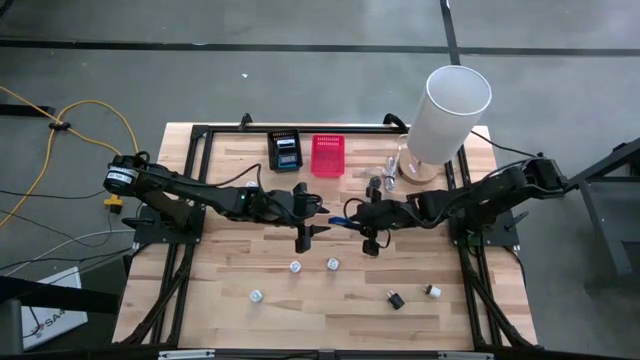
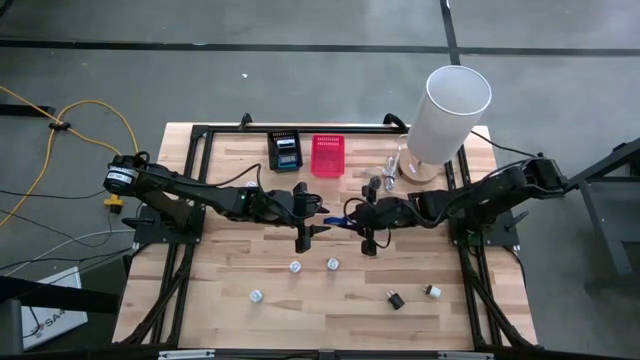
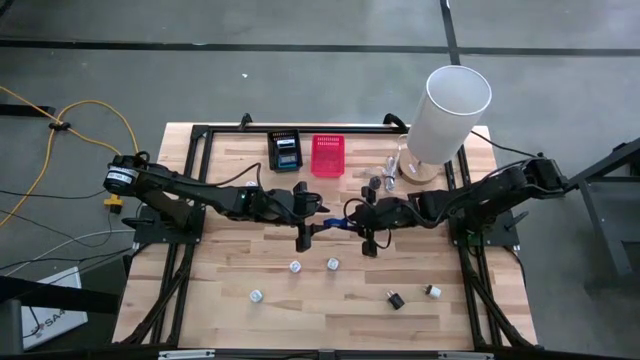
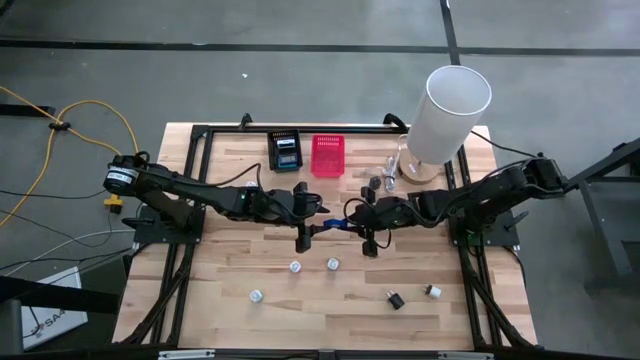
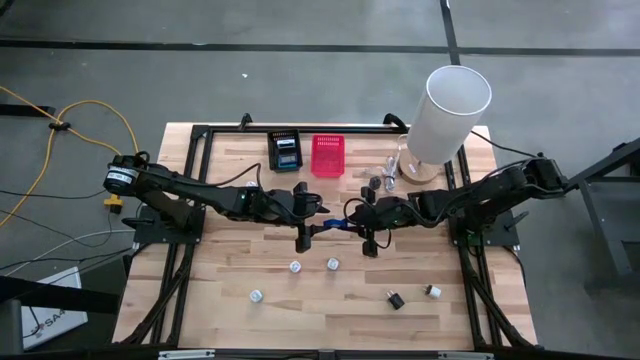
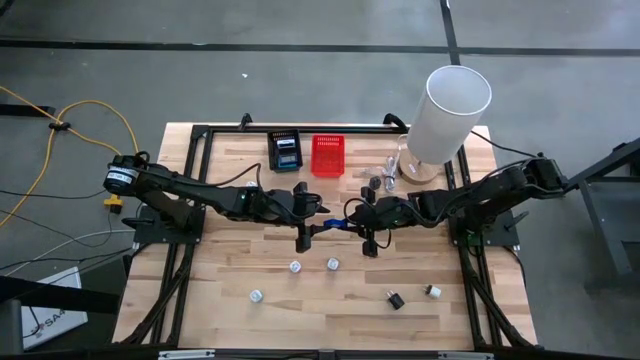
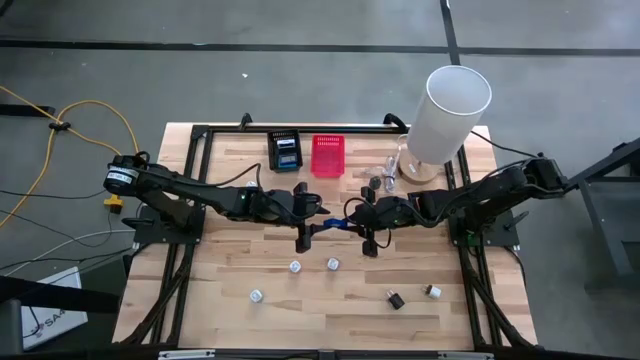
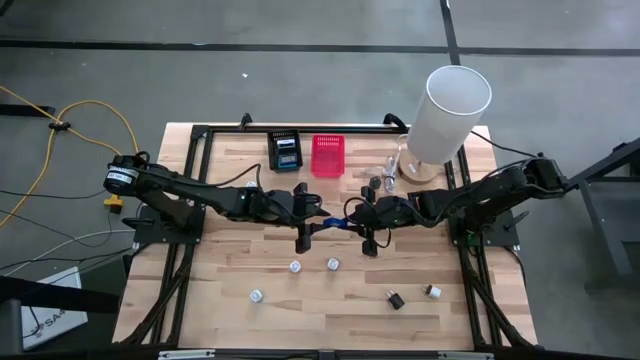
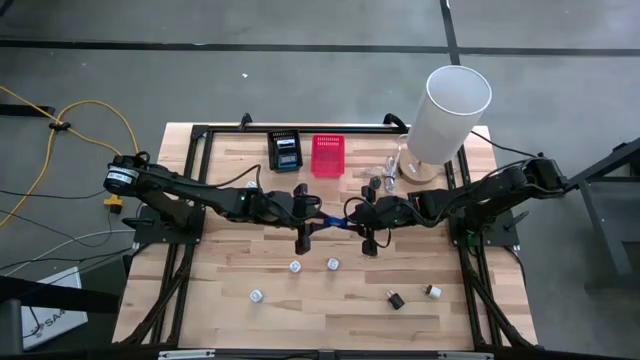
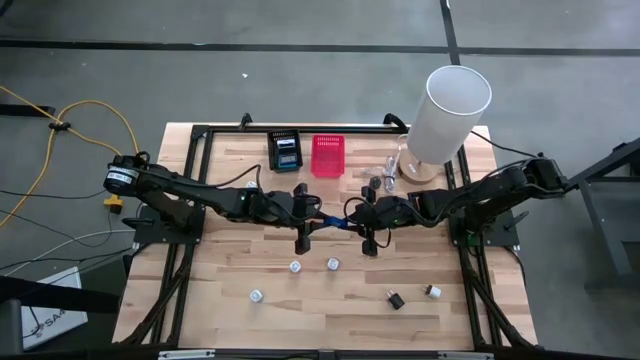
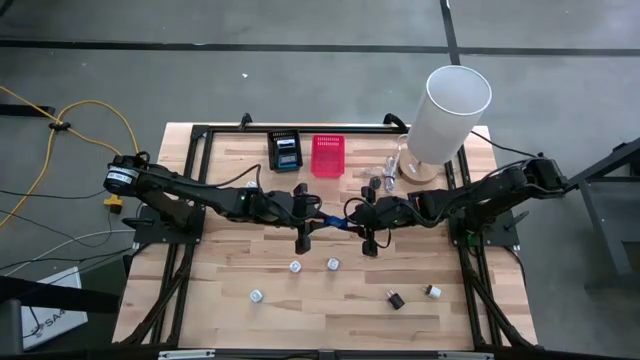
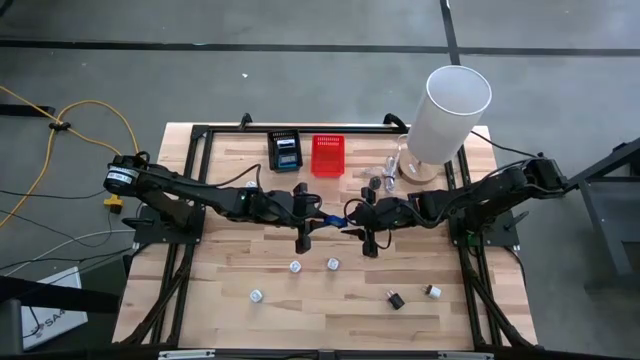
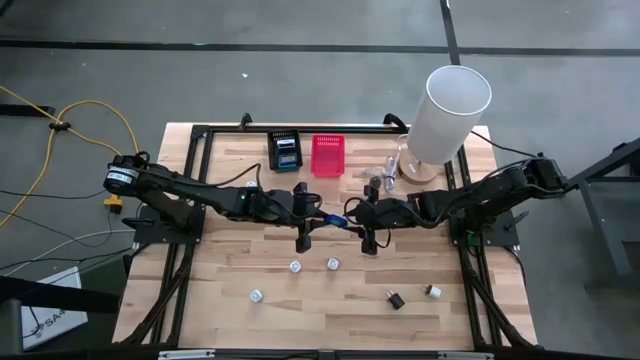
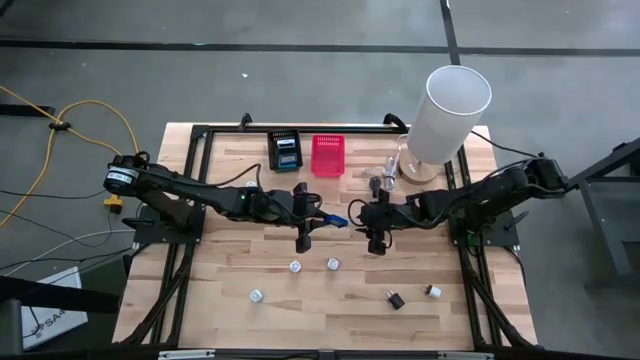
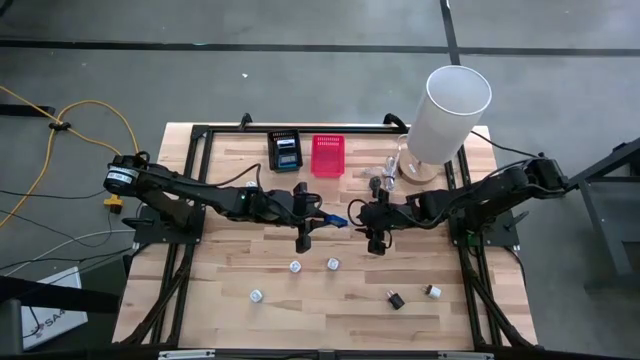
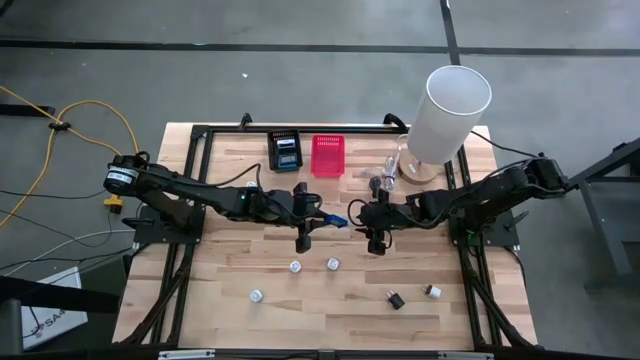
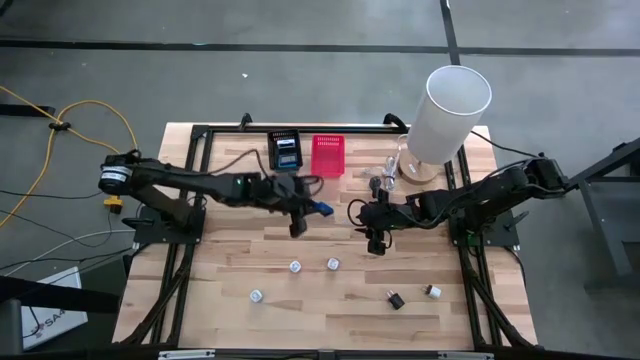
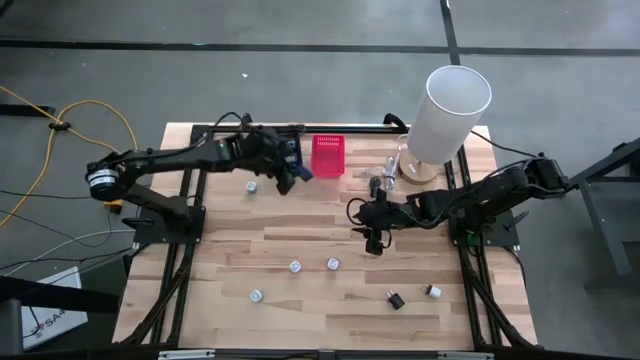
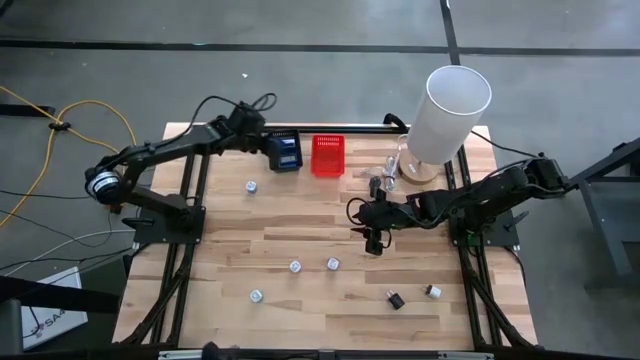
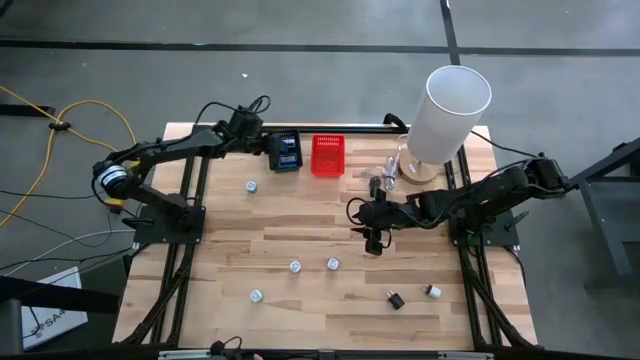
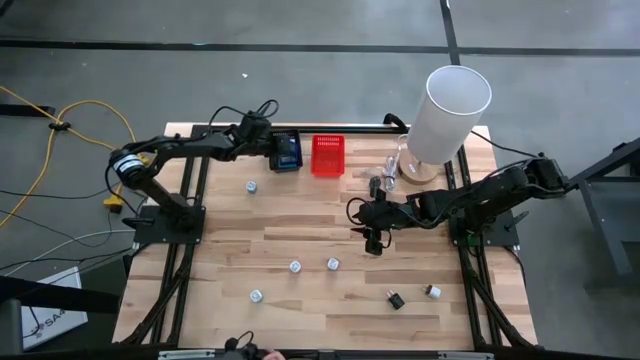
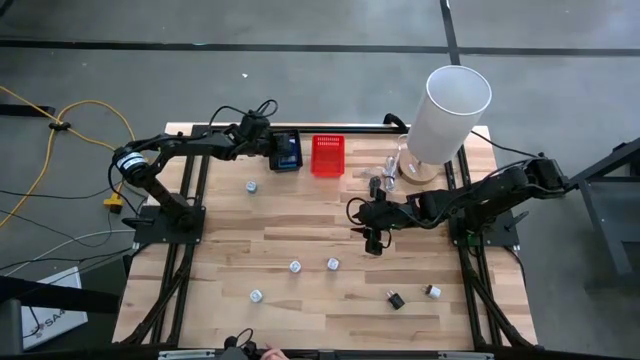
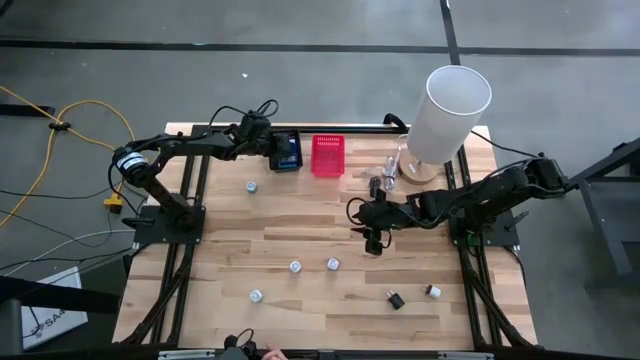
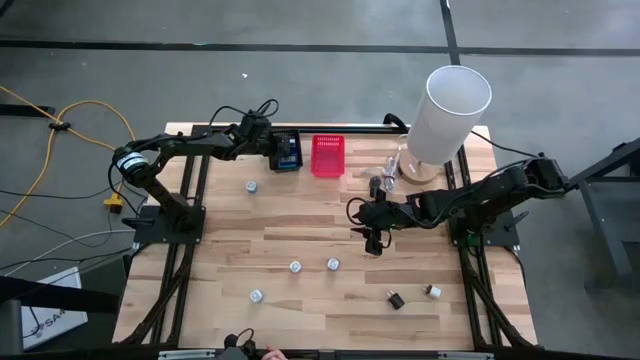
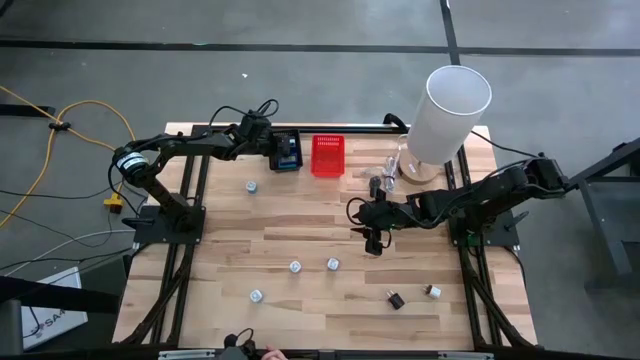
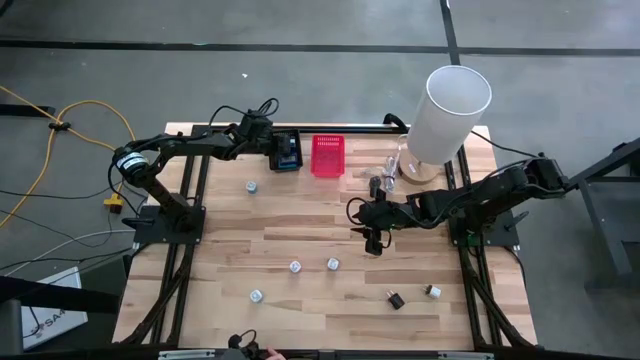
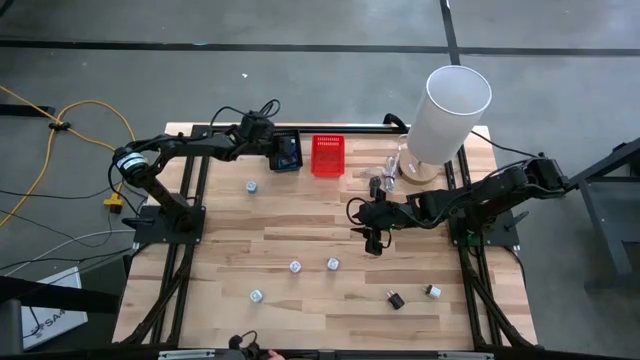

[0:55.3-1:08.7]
Task: Pick & Place Office items
Put the blue digital timer into the black basket
